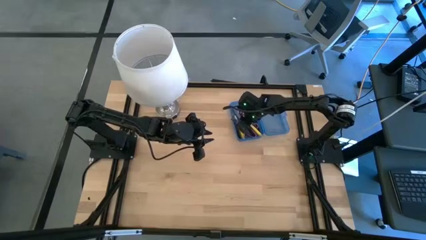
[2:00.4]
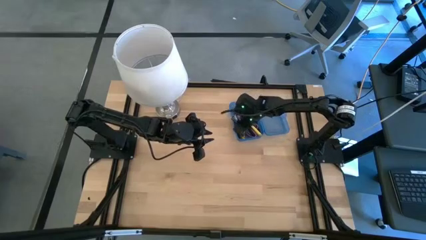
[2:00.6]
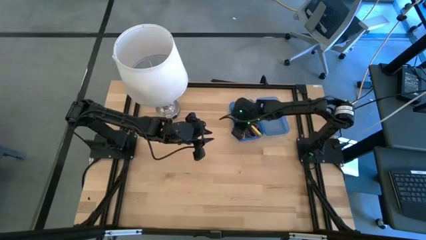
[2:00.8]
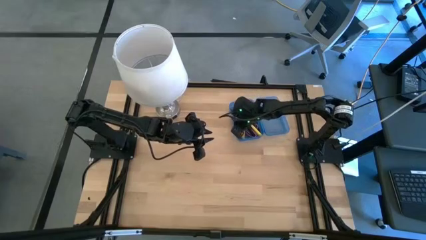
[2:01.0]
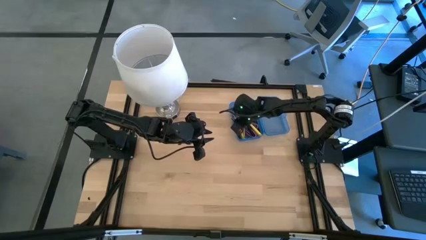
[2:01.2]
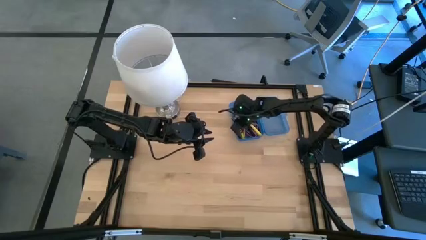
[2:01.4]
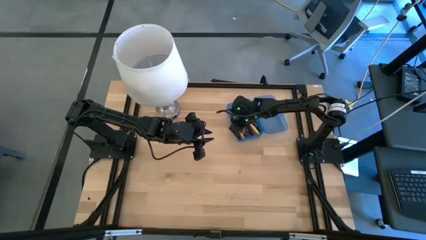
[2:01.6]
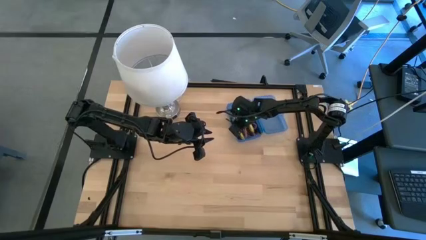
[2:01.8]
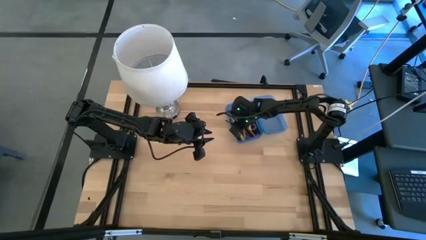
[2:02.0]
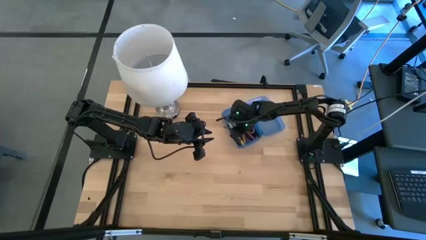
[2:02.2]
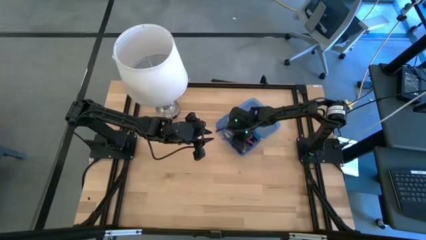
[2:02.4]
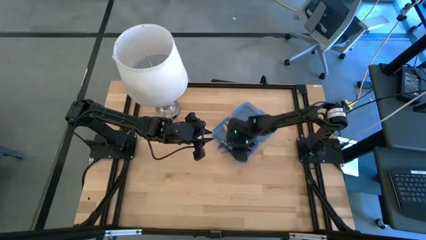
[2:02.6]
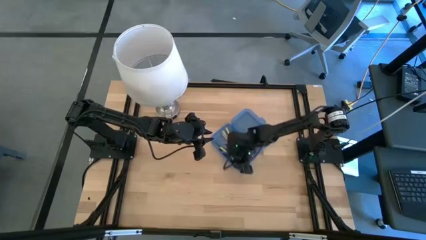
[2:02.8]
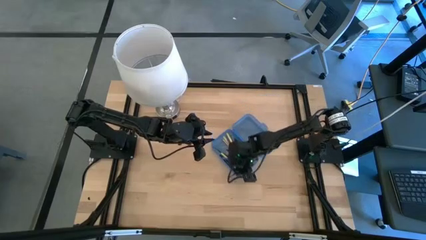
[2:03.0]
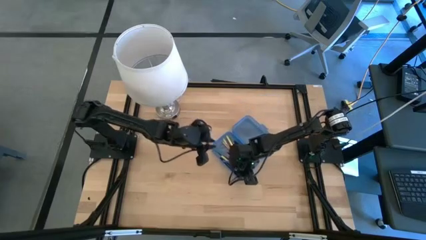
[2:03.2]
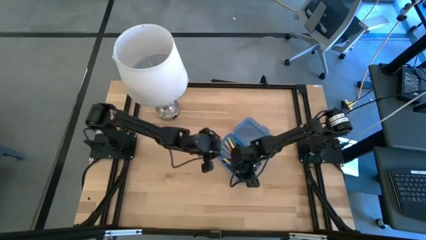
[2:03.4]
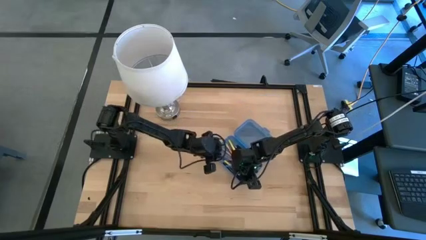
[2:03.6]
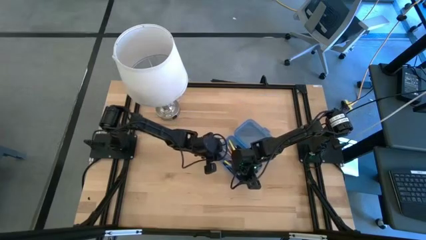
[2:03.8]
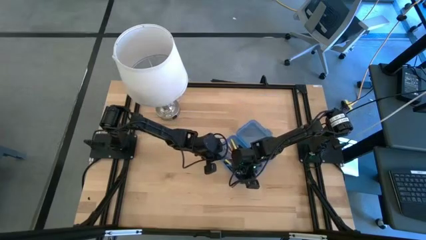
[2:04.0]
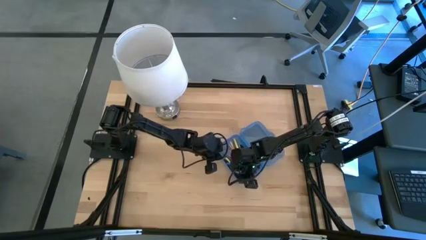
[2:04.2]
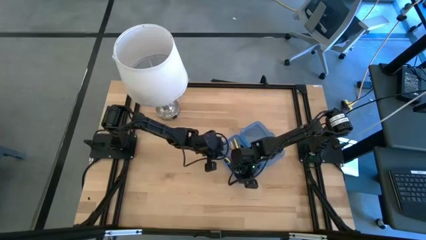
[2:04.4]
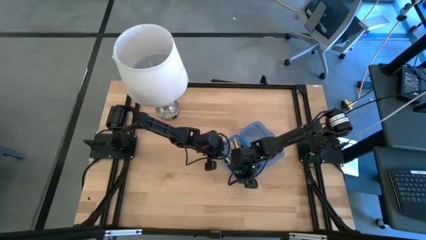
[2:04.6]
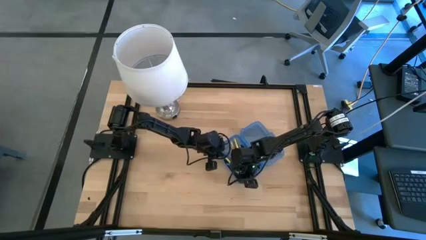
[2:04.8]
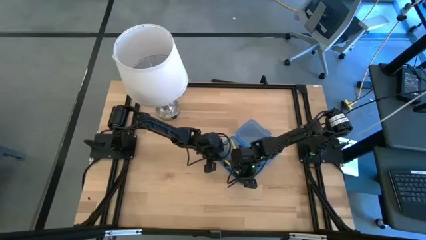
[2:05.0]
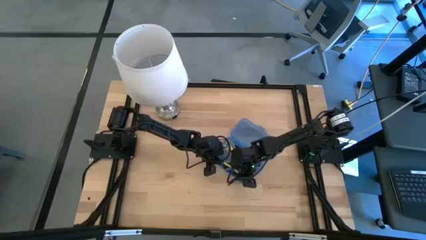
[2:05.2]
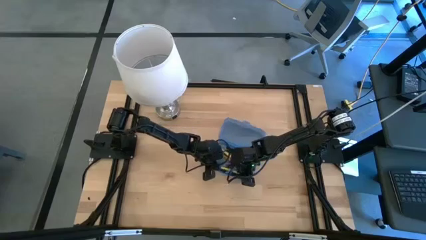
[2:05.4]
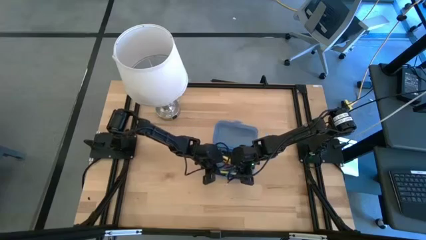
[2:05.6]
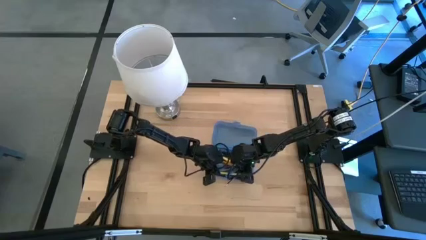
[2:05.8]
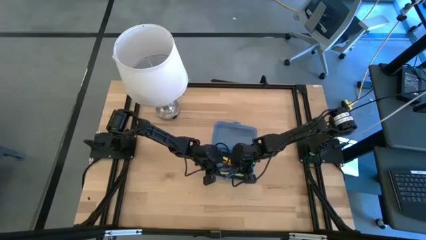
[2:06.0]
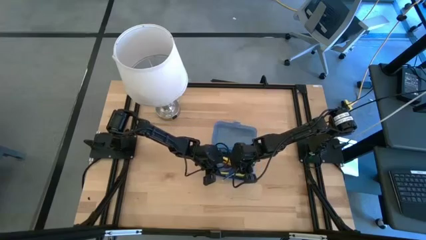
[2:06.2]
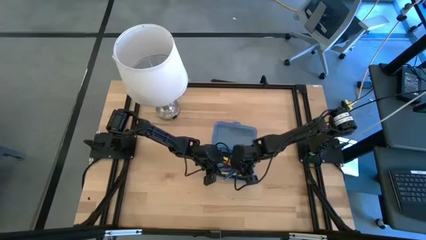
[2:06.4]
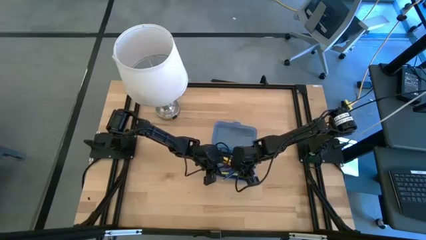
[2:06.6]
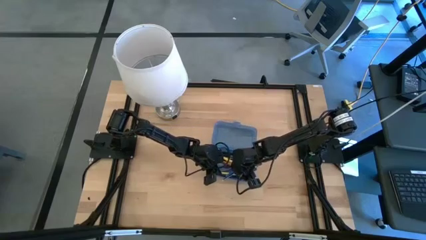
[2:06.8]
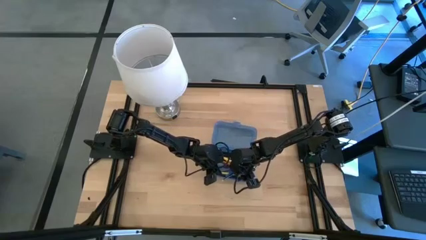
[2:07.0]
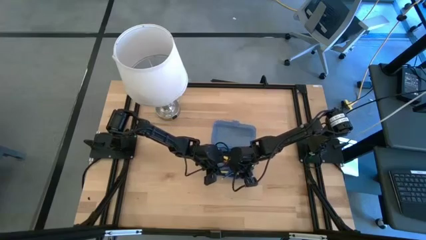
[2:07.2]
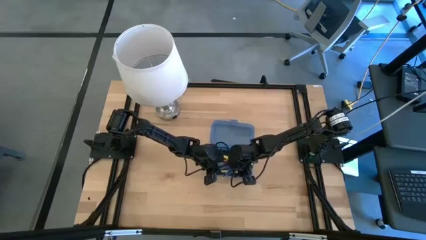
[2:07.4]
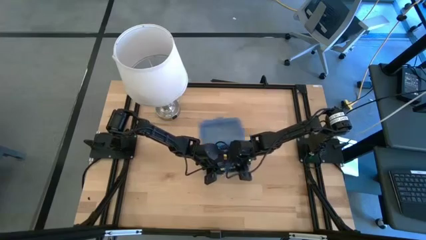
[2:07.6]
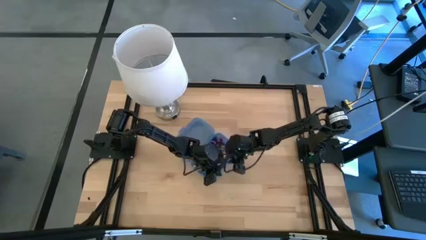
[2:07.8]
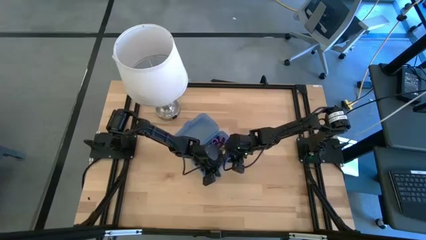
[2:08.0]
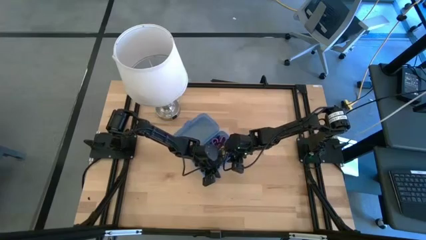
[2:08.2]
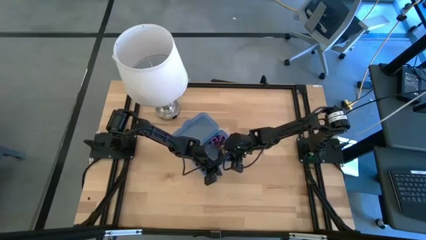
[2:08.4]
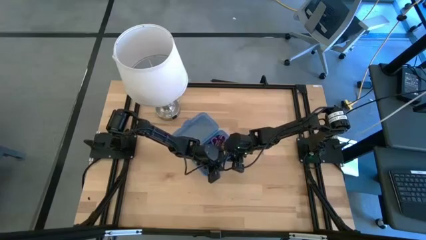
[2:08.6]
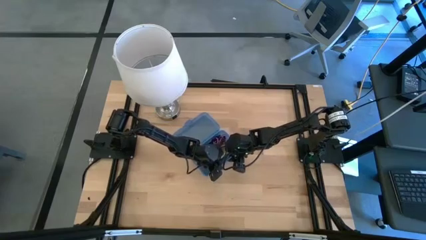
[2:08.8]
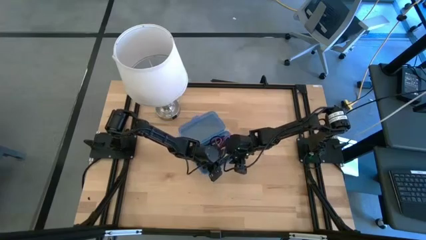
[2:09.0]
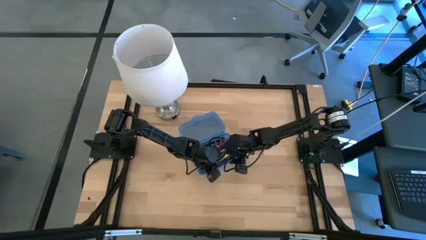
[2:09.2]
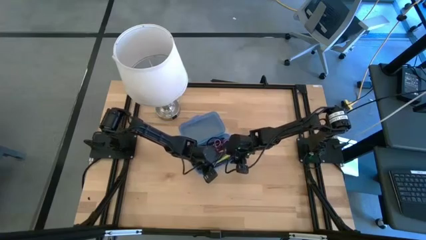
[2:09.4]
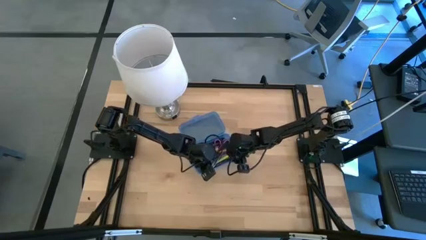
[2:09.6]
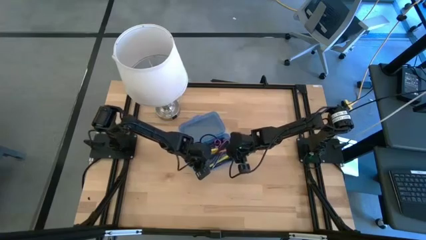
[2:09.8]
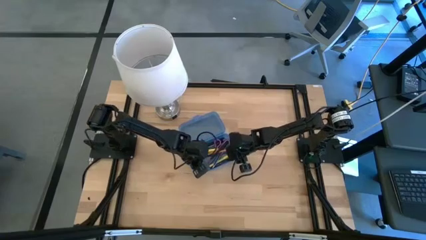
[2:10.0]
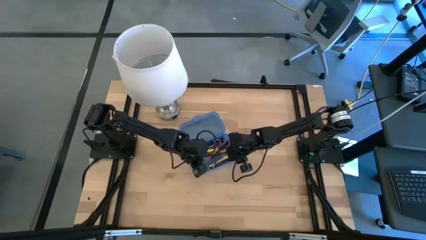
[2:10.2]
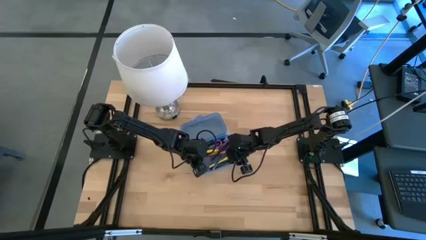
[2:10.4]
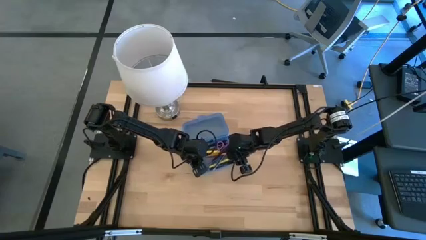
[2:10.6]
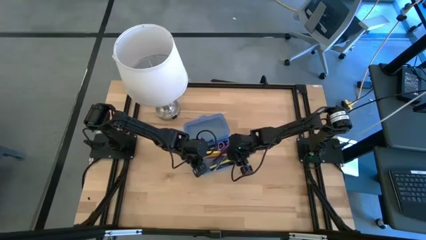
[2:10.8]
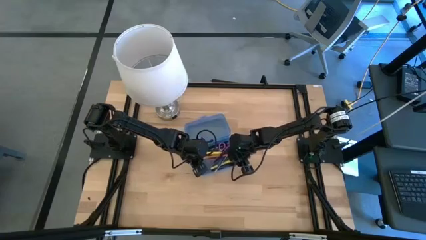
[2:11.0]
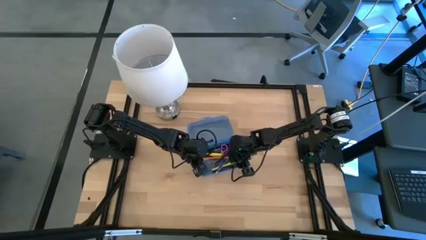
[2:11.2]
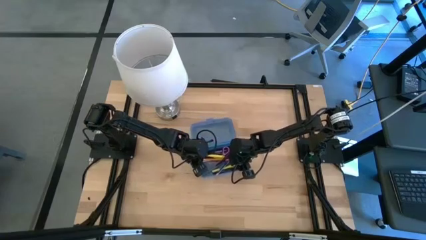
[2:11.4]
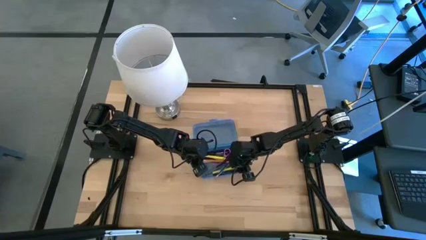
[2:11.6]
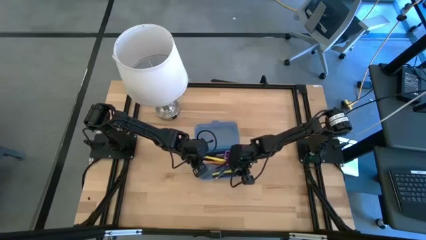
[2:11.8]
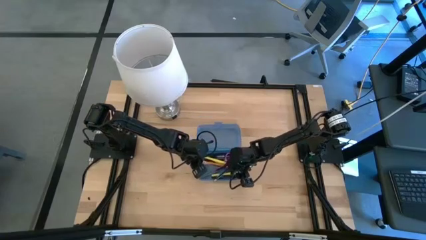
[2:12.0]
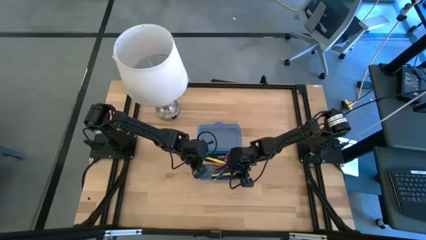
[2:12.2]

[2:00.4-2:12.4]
Task: Pick & place school supplies into a supply box
Move the blue supply box to the center of the table
